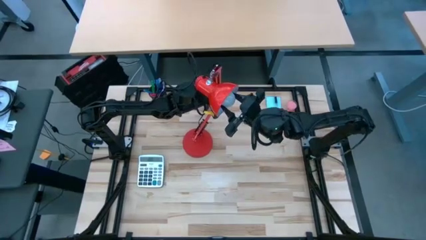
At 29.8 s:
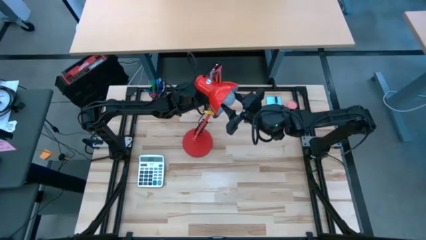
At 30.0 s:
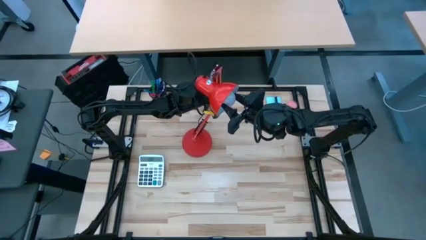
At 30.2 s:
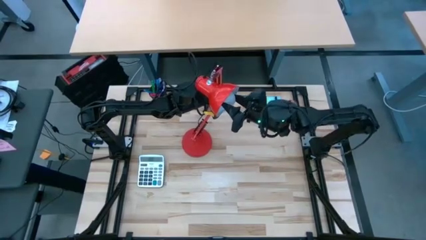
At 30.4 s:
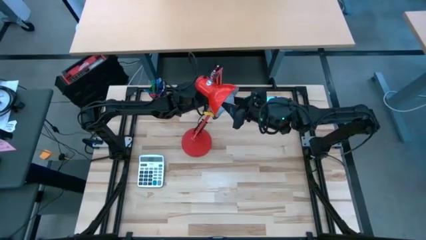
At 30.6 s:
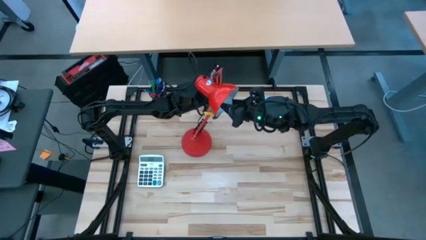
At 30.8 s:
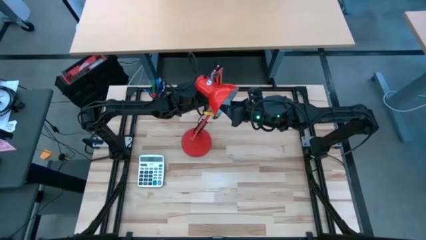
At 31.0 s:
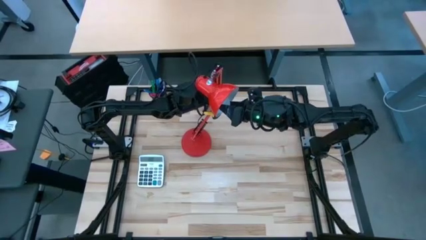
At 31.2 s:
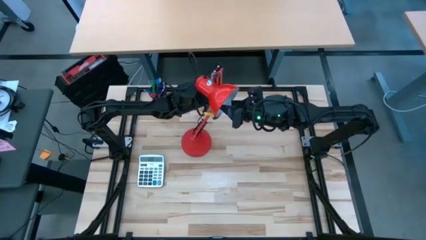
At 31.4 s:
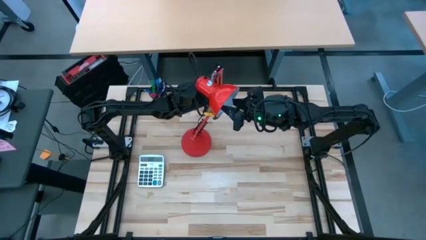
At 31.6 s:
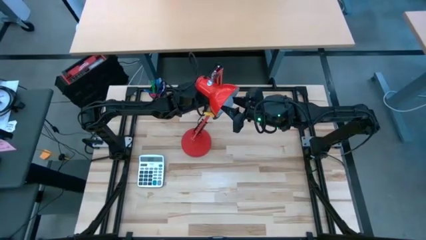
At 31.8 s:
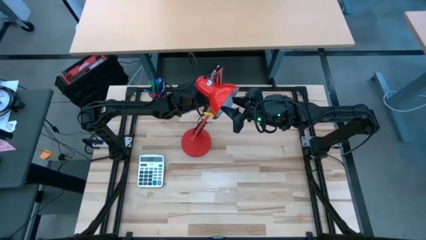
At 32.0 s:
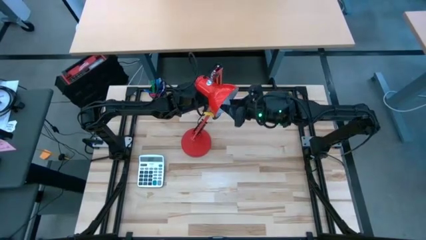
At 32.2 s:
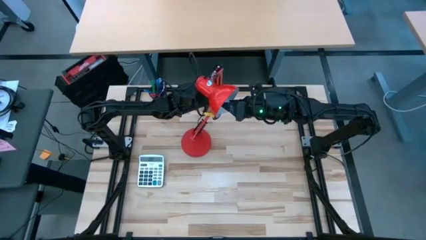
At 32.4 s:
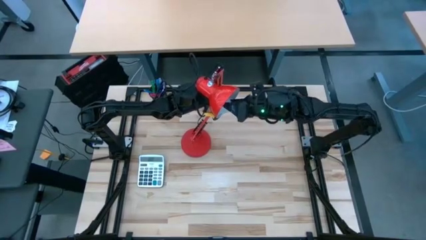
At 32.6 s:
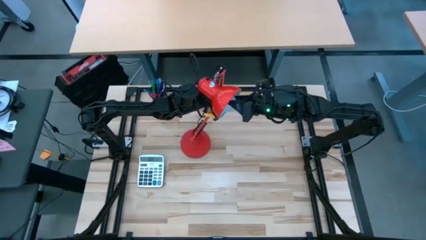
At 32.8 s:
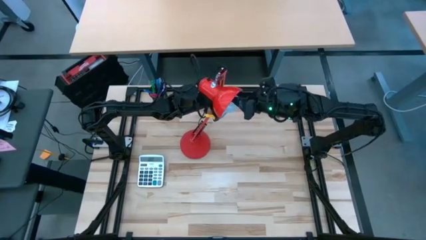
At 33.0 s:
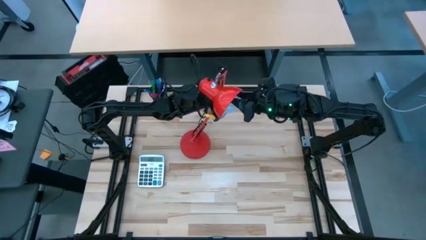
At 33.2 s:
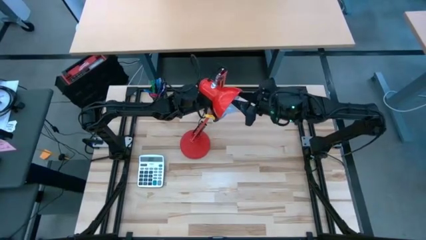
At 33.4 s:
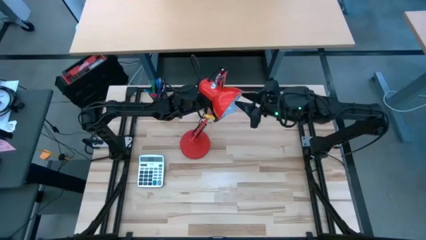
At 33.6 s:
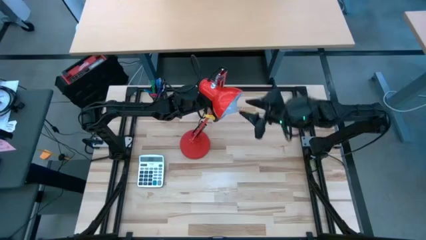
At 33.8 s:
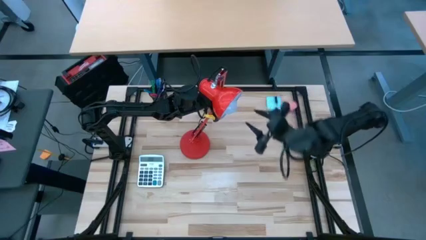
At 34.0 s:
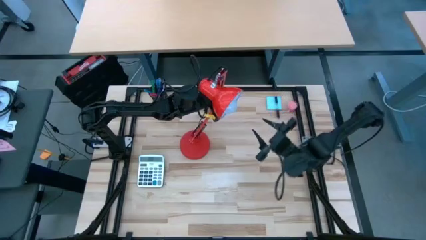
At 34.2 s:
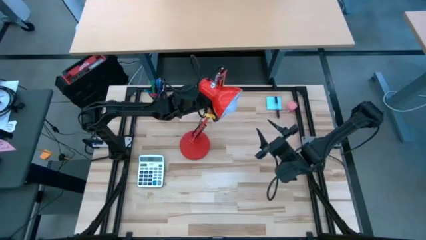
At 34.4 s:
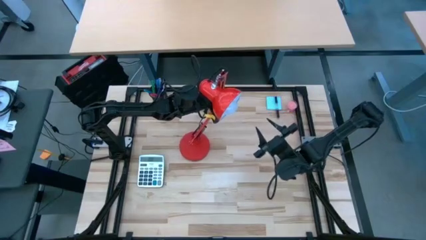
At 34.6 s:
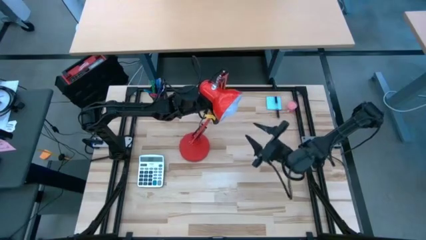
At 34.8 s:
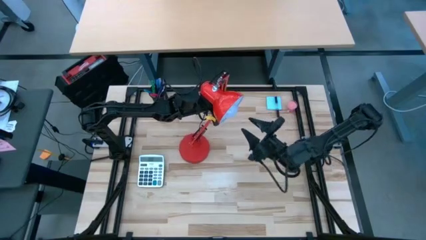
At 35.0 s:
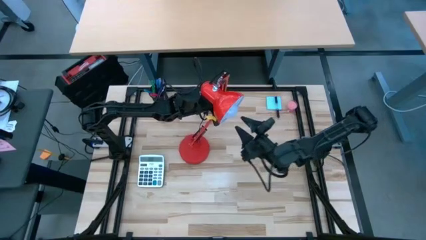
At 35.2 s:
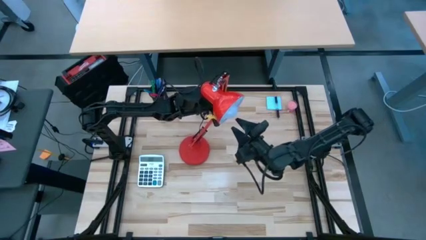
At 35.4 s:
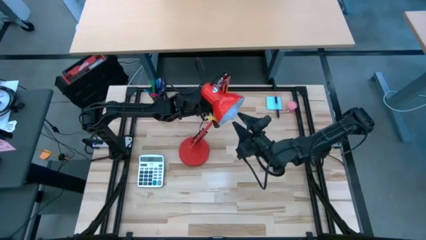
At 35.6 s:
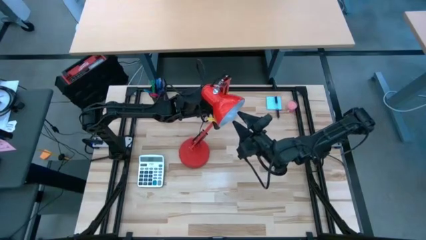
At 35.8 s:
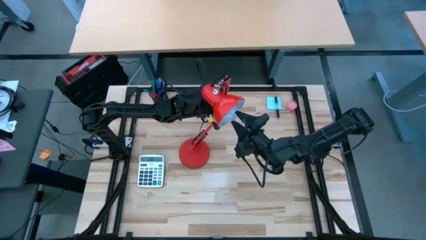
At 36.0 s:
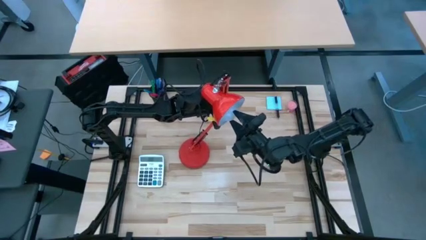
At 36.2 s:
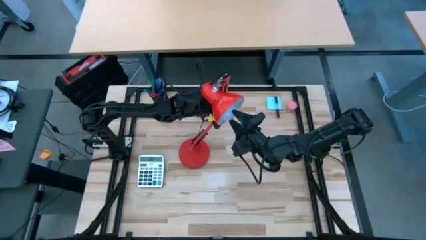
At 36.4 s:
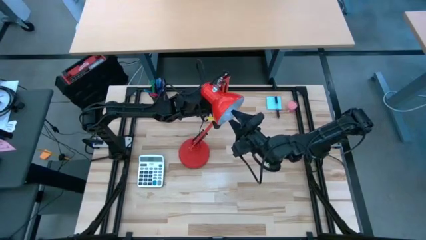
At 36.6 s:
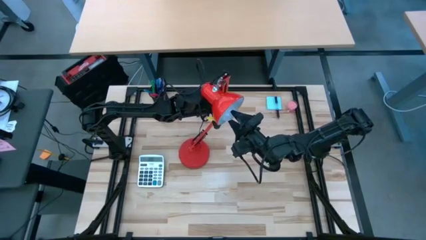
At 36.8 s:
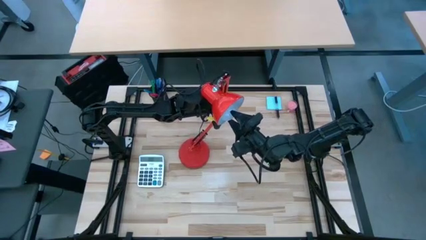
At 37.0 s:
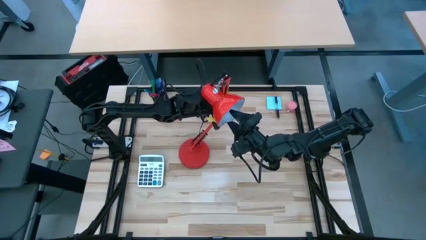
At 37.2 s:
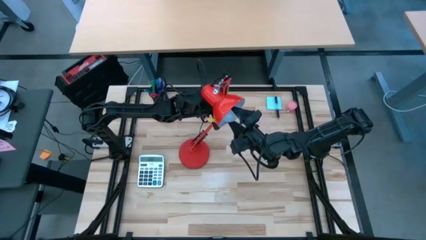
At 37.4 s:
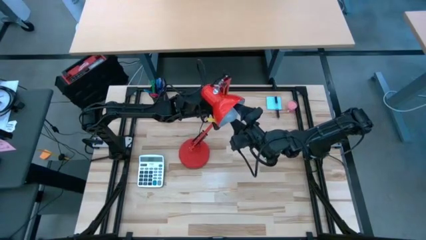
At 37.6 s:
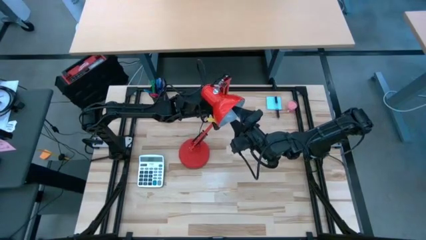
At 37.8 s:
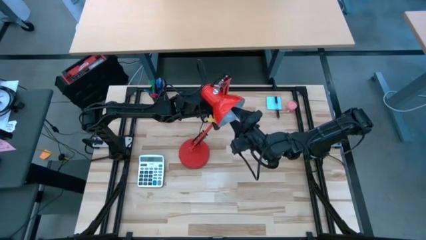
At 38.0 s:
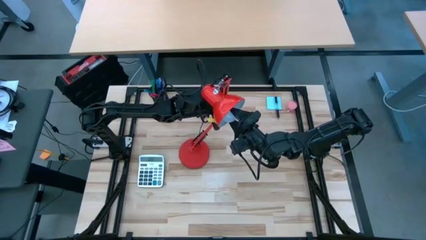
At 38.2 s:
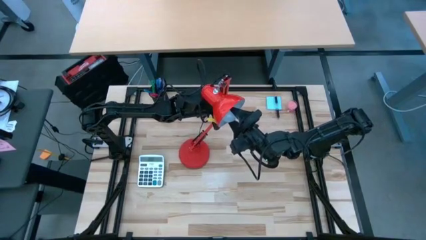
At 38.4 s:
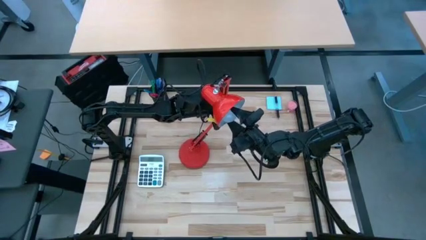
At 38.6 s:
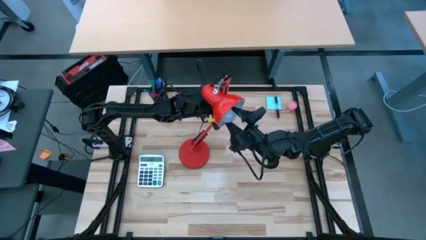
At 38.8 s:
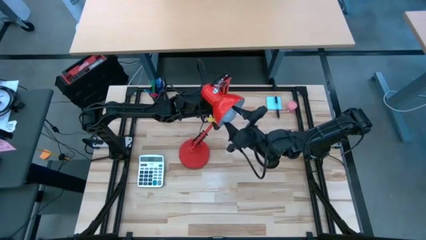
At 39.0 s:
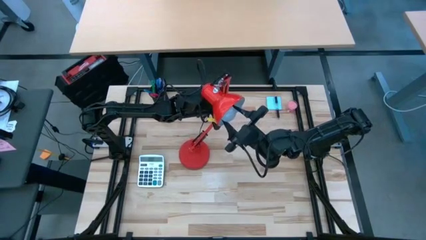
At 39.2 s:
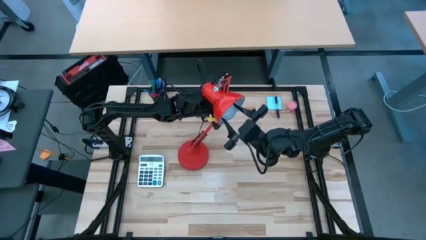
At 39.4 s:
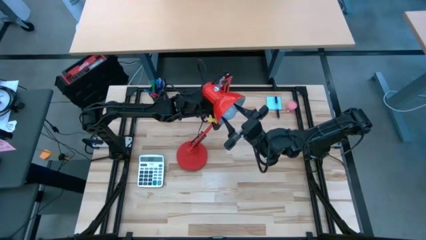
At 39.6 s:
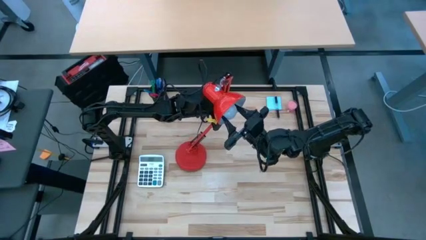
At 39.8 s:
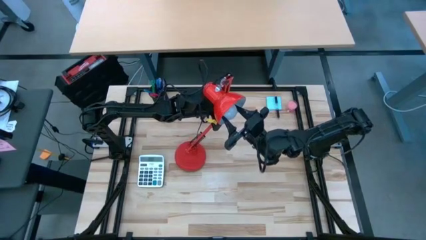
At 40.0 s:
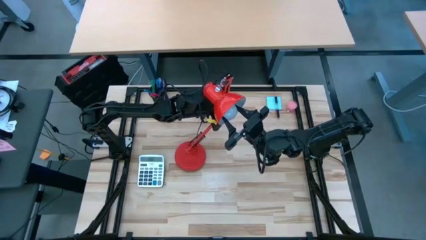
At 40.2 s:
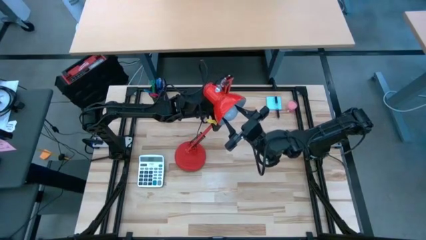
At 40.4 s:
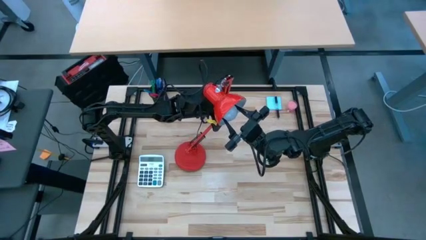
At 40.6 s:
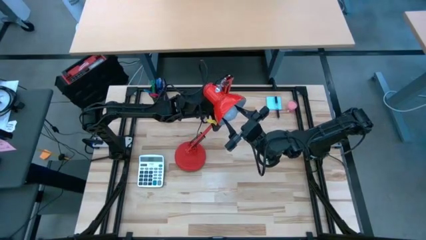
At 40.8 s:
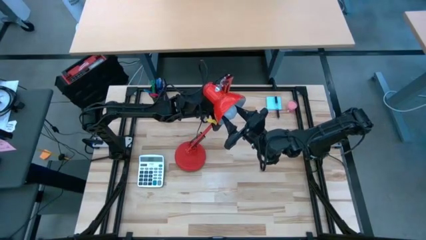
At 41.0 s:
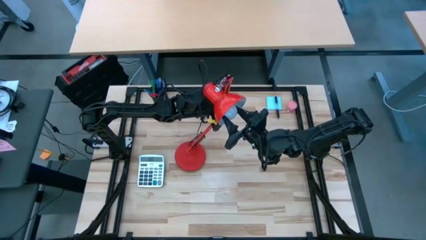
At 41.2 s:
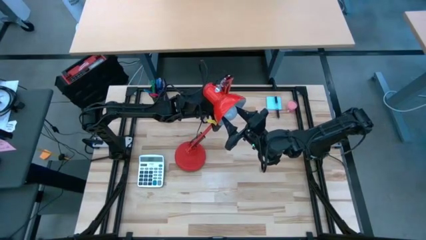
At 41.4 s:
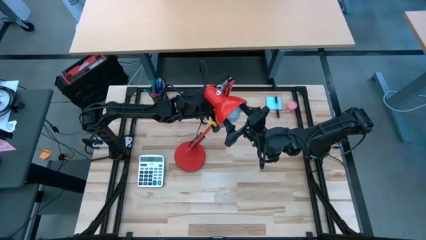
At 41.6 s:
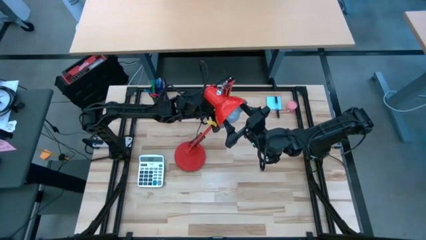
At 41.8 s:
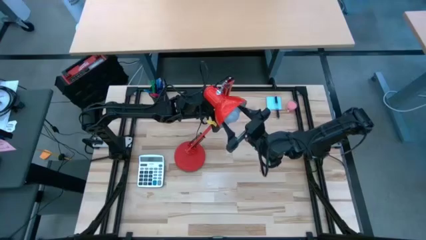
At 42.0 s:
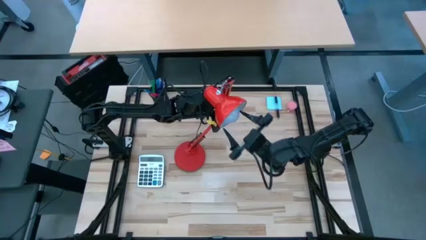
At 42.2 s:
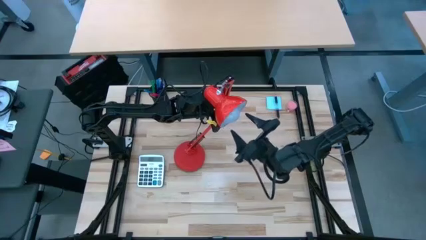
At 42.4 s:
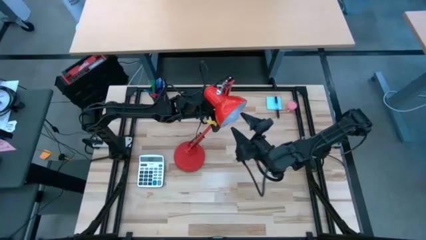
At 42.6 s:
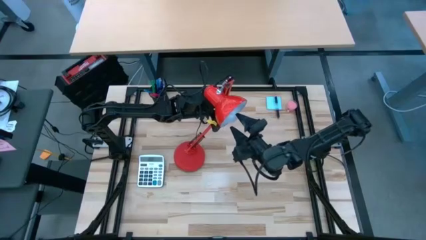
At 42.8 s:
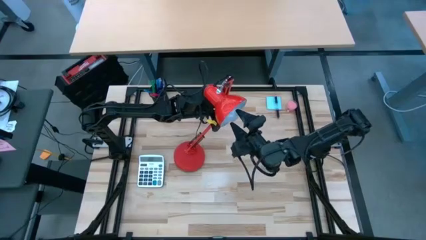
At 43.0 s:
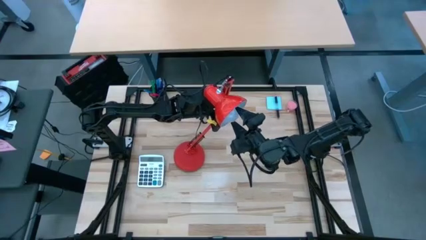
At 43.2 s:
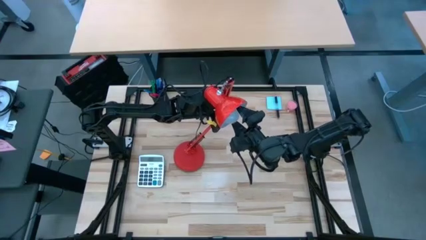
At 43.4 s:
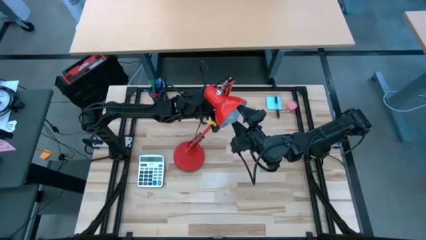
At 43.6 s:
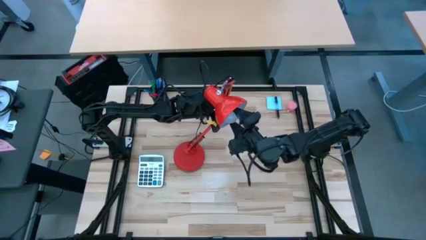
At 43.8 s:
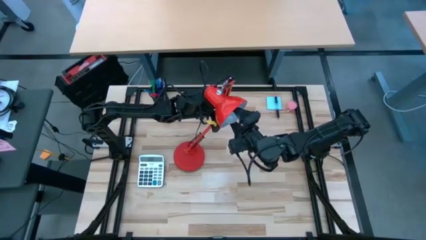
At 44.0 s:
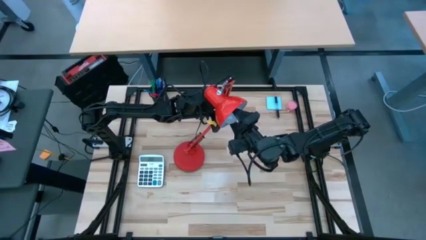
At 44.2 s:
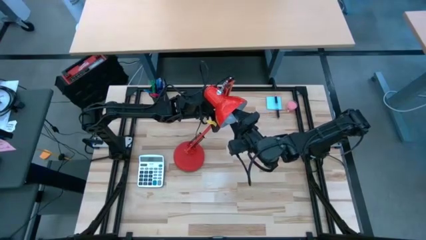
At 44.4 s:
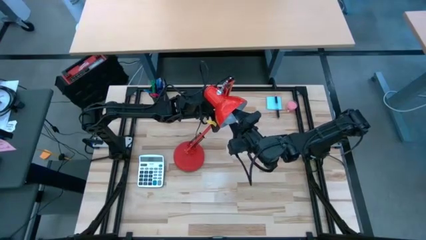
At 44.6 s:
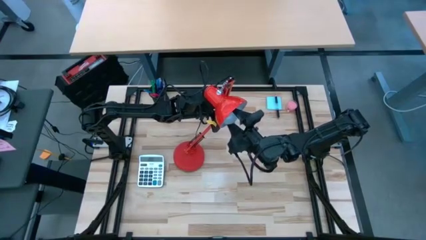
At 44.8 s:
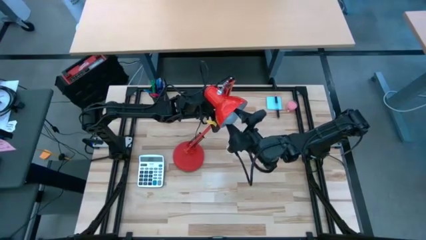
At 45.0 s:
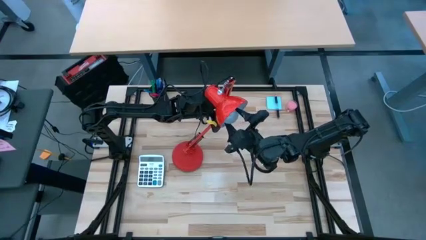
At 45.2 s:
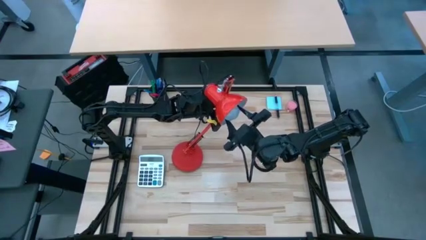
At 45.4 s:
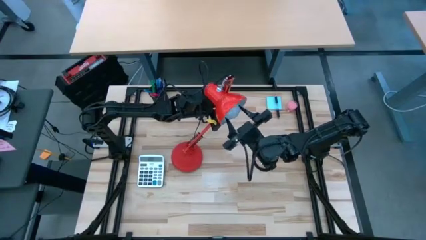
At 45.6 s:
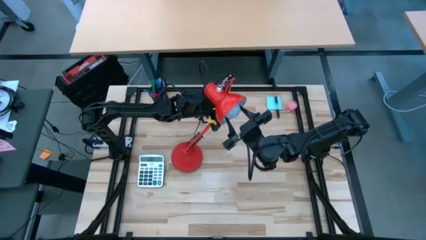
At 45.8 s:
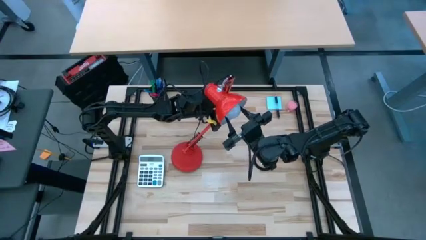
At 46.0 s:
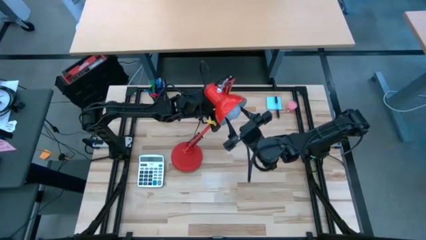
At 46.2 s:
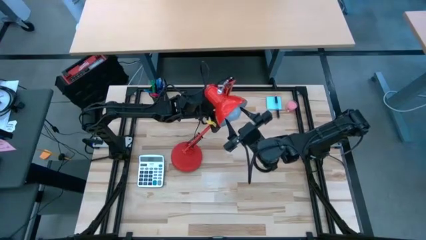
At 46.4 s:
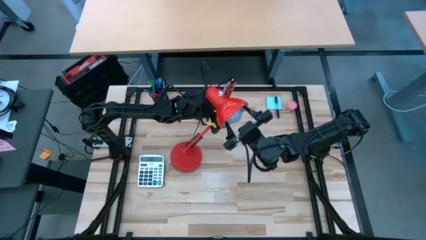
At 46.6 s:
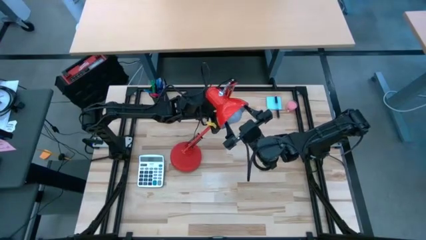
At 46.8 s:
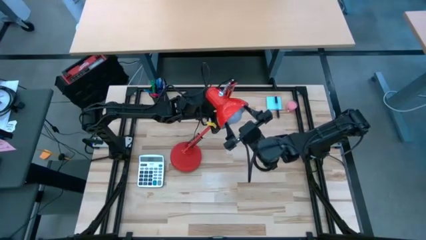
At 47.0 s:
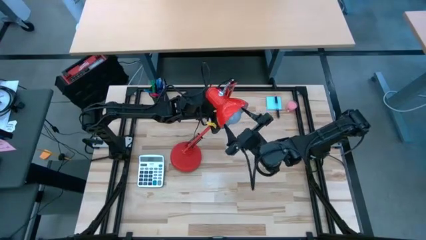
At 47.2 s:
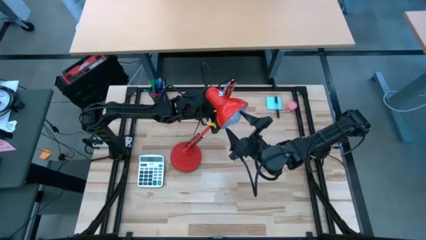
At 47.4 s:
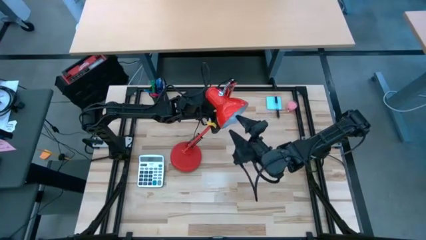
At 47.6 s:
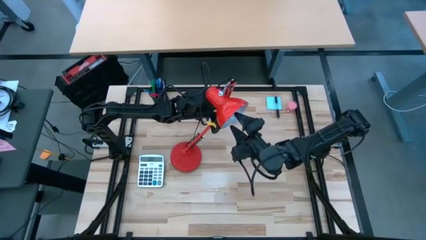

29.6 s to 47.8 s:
Task: Screw lightbulb
Insert the white lightbulb into the red desk lamp
